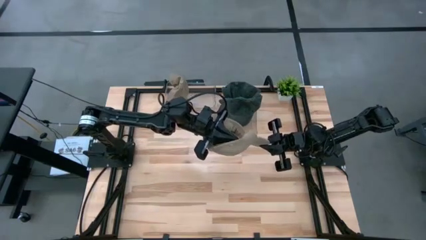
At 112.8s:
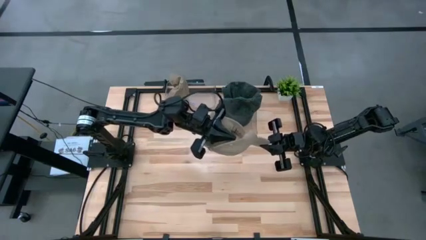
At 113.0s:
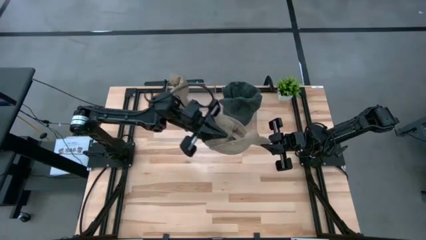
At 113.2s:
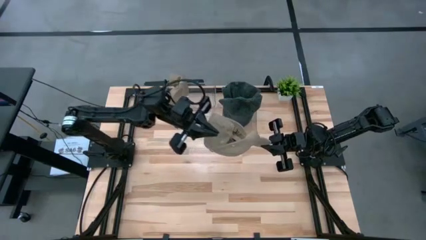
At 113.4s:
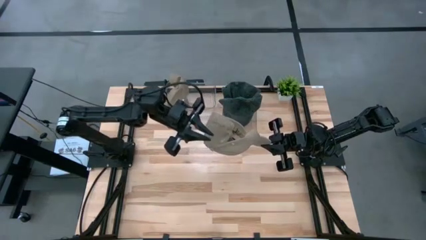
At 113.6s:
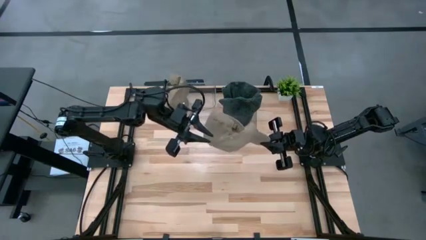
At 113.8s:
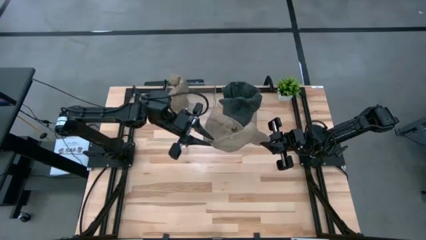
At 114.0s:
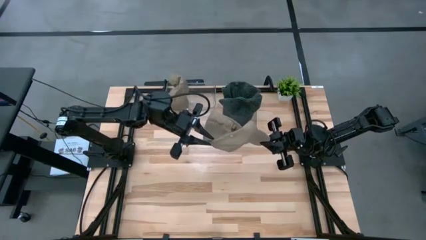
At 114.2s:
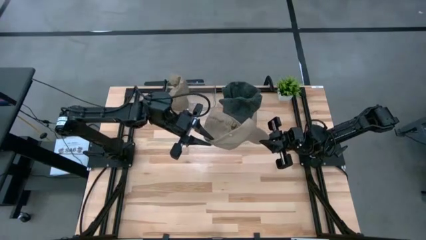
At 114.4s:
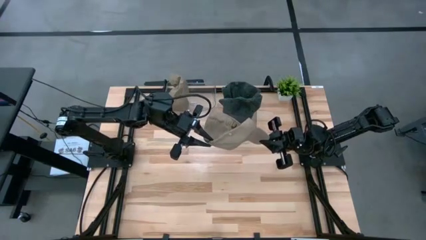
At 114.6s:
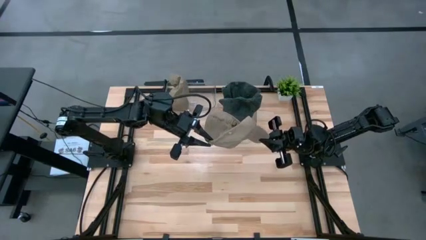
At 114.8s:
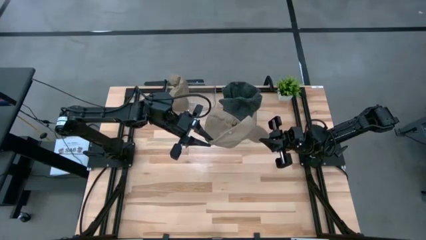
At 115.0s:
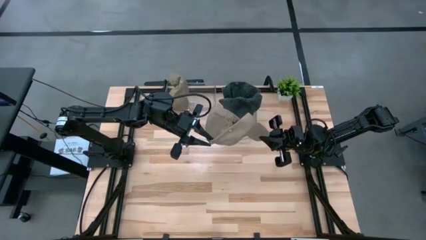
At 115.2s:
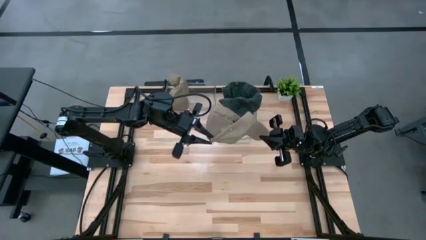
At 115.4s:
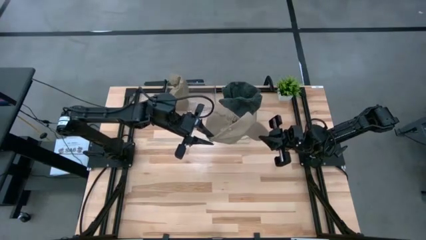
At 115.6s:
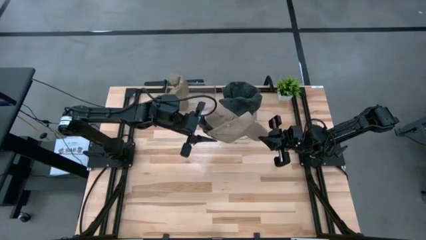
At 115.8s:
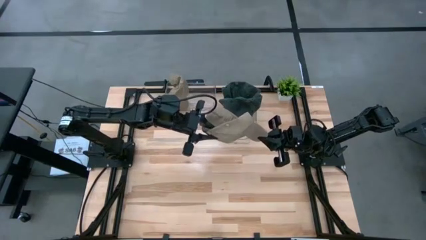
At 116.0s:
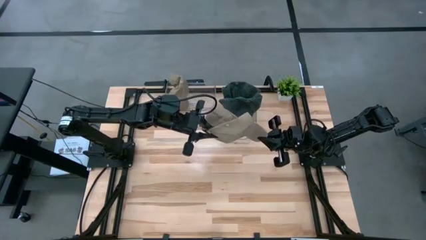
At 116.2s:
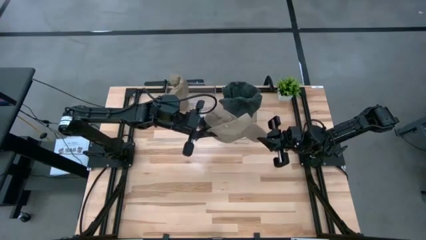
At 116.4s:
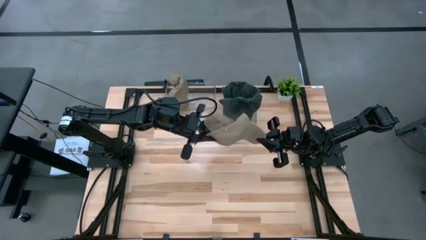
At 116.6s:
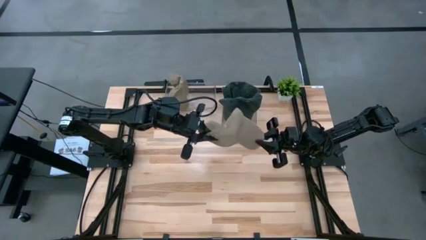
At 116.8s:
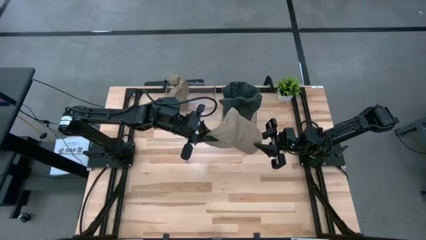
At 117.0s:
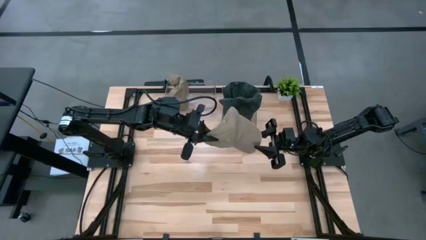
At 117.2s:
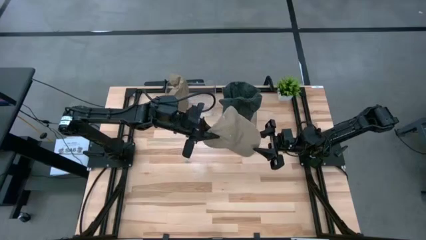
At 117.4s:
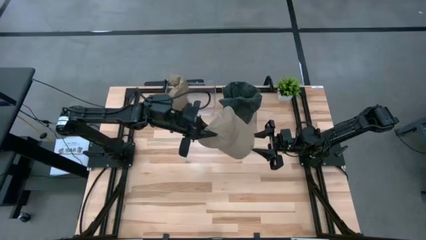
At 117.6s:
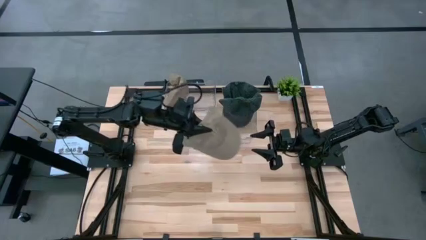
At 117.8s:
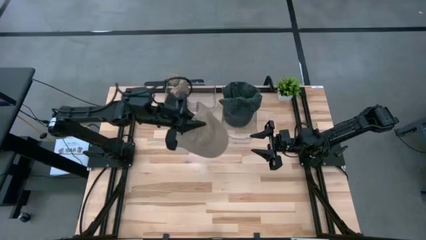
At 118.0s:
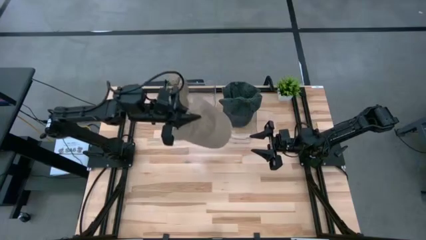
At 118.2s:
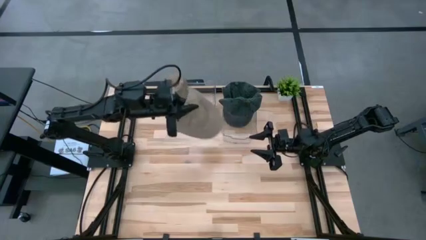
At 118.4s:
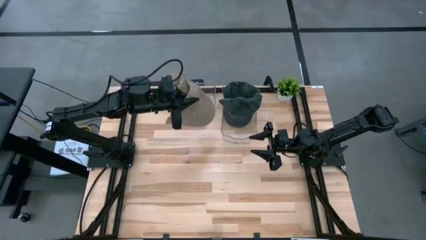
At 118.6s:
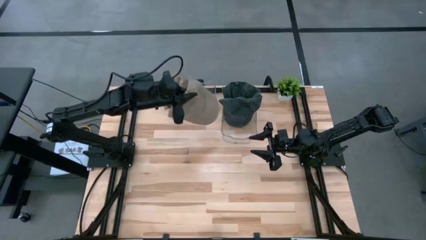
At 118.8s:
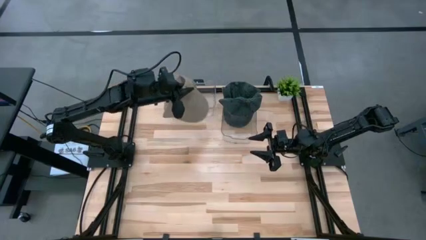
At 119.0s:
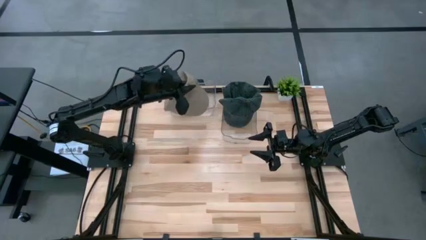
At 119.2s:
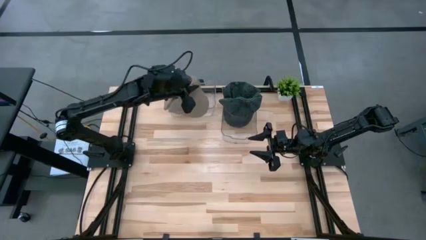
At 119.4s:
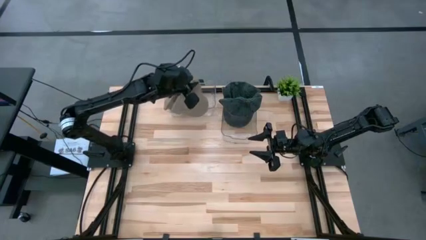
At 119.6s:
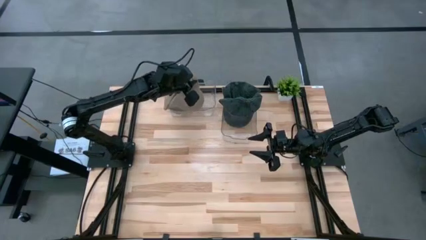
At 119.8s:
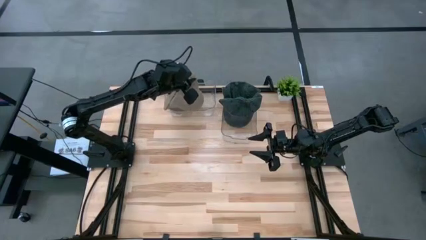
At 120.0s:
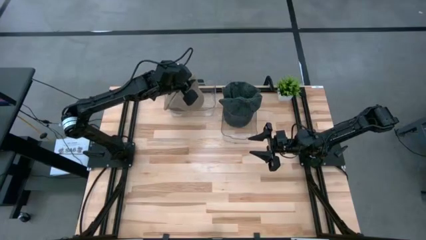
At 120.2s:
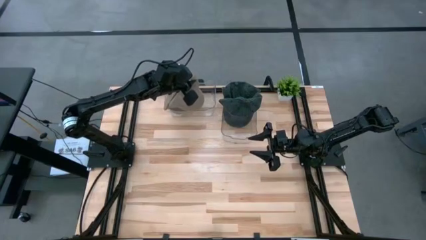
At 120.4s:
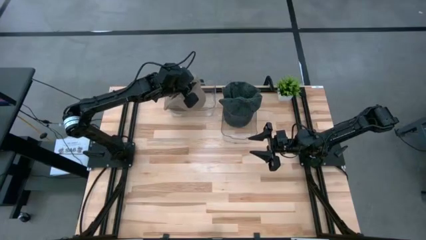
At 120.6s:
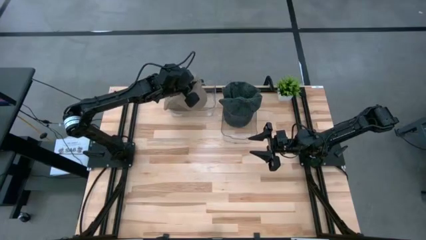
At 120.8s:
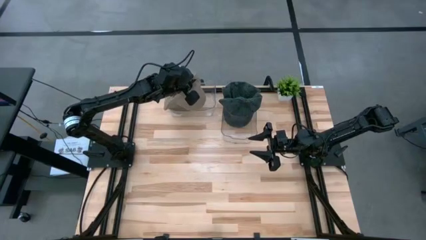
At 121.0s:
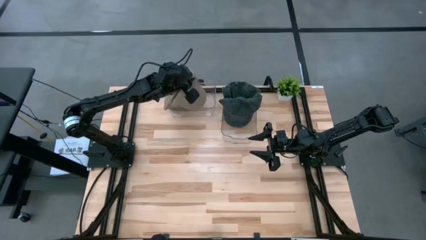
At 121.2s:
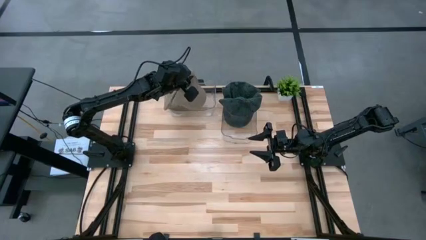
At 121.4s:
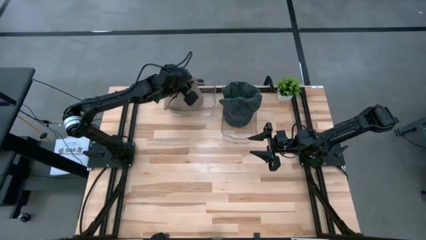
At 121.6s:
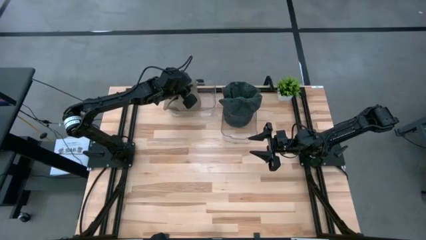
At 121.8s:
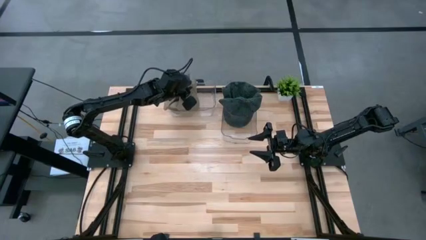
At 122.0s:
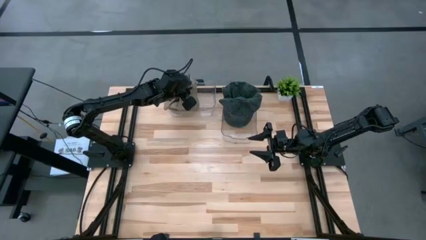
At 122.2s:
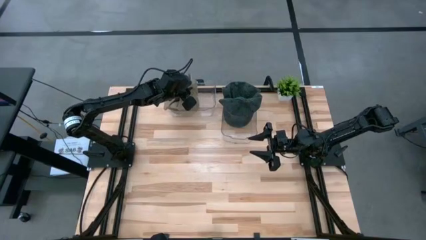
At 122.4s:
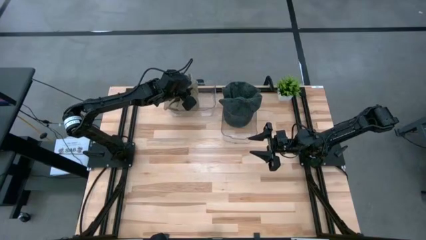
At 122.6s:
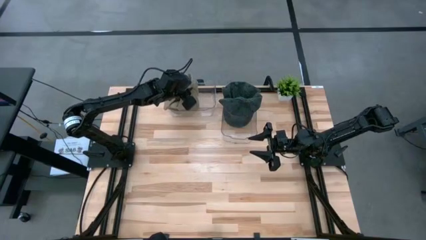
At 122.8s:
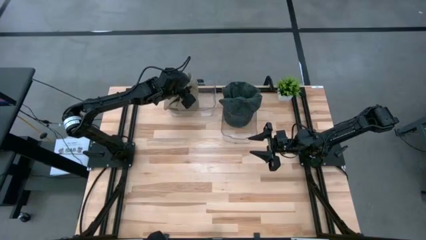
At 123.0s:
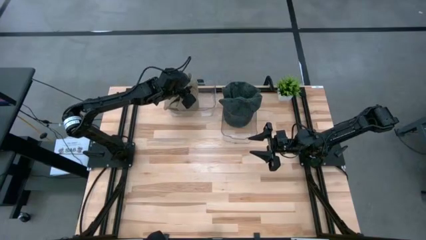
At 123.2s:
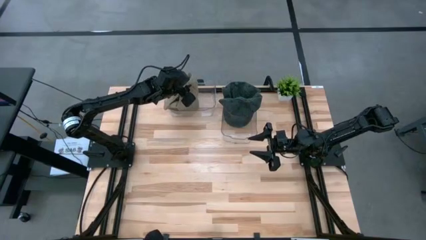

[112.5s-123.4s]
Task: Pick & Place hat
Put the brown cap into the left transparent bin

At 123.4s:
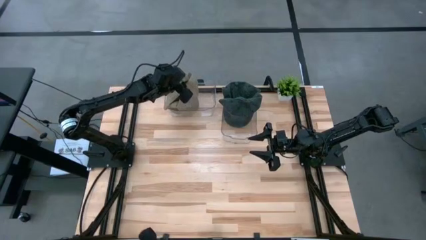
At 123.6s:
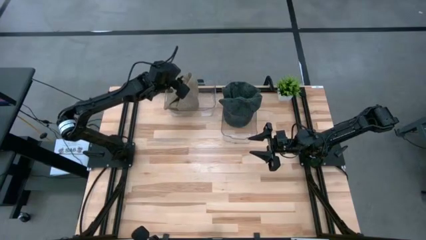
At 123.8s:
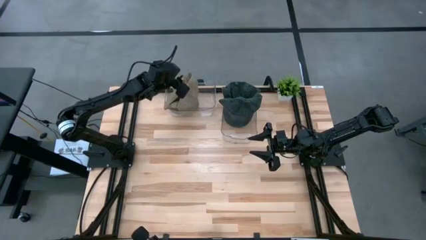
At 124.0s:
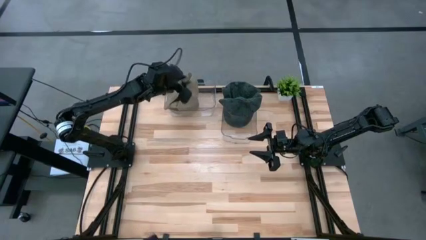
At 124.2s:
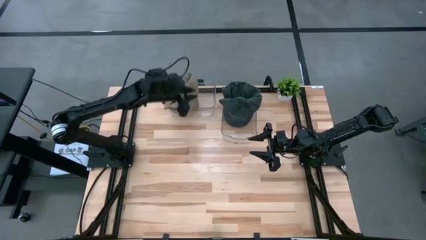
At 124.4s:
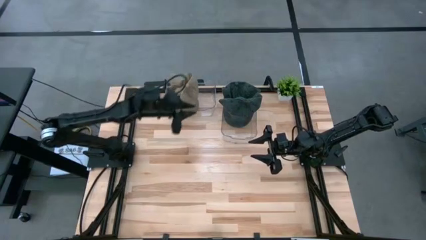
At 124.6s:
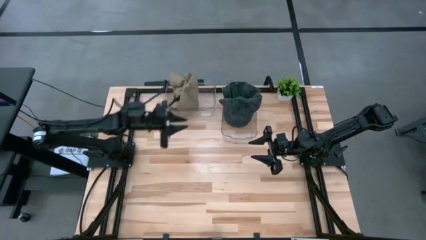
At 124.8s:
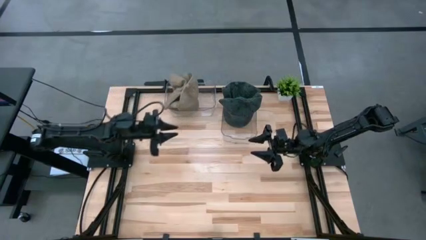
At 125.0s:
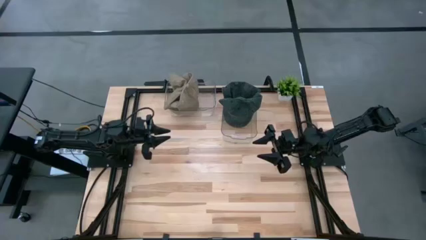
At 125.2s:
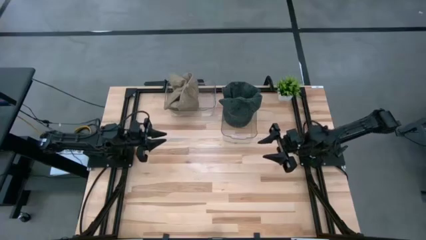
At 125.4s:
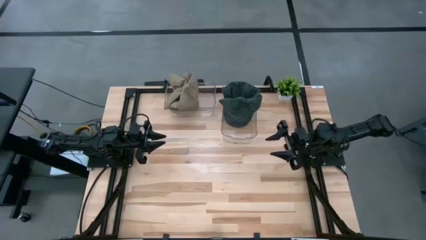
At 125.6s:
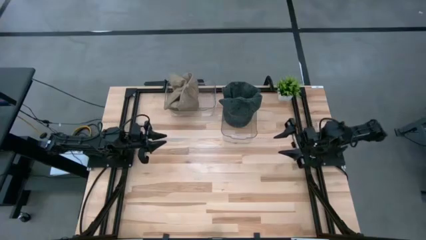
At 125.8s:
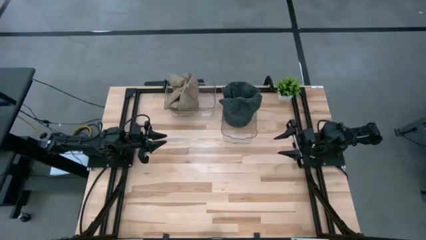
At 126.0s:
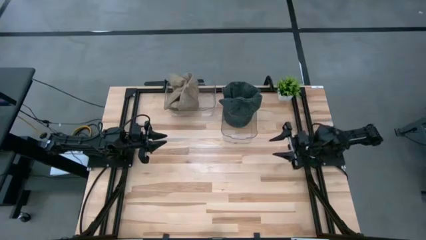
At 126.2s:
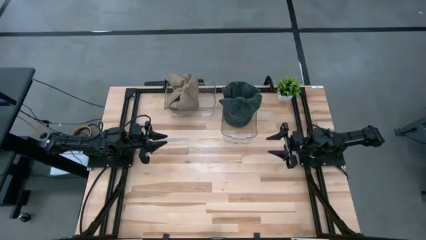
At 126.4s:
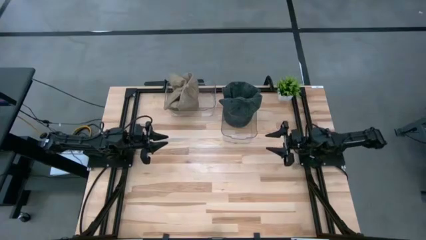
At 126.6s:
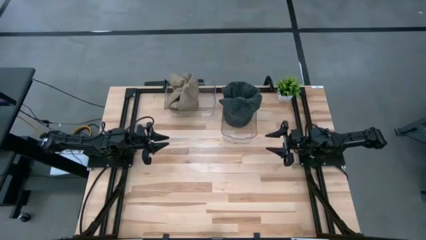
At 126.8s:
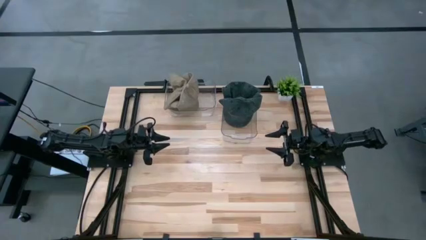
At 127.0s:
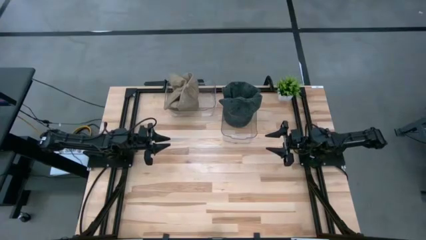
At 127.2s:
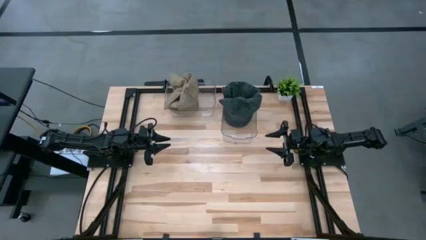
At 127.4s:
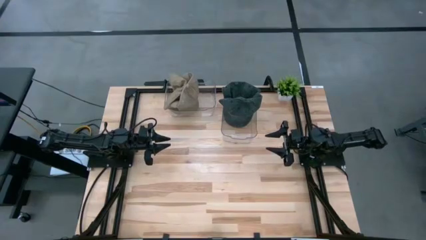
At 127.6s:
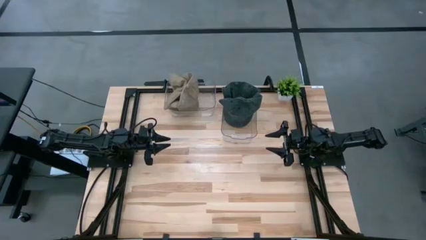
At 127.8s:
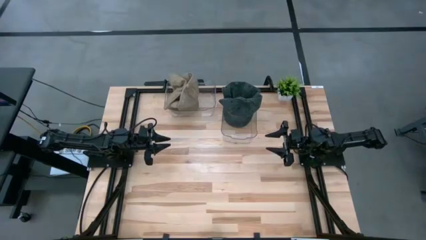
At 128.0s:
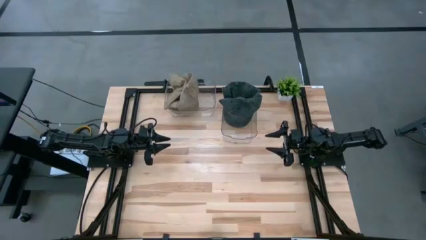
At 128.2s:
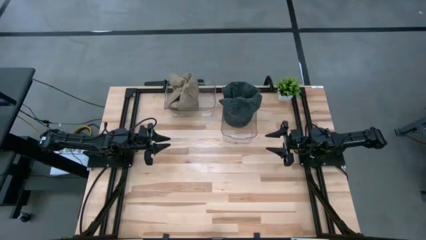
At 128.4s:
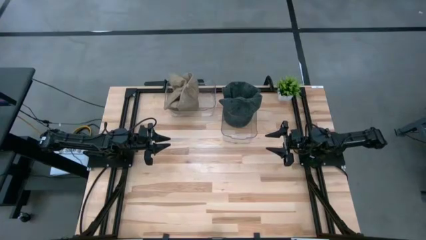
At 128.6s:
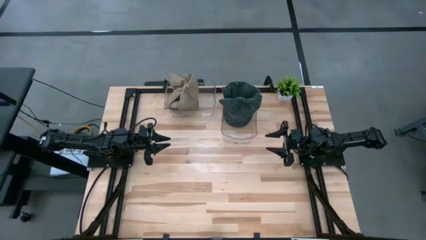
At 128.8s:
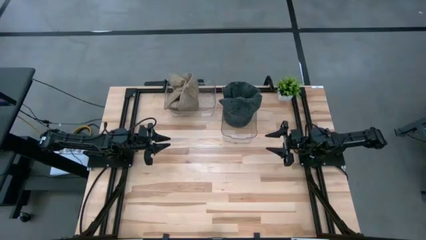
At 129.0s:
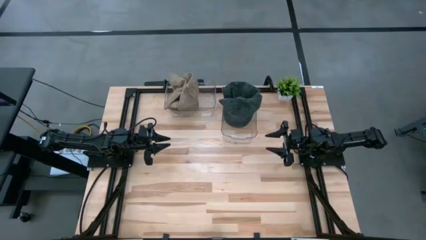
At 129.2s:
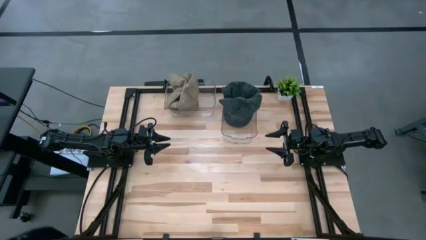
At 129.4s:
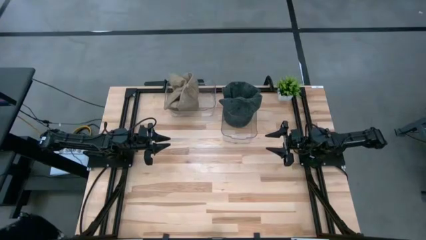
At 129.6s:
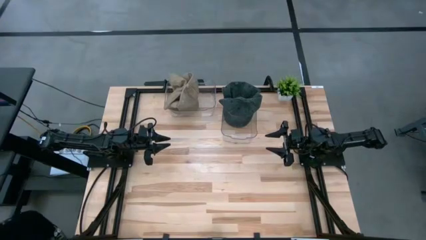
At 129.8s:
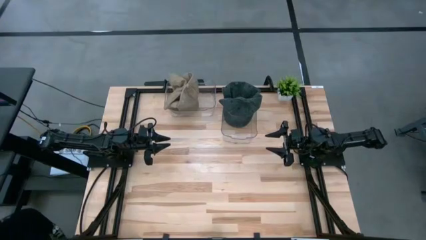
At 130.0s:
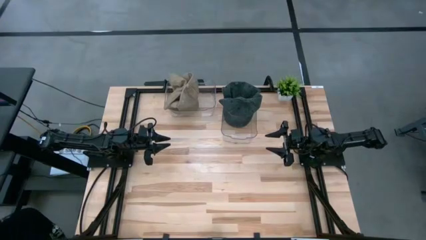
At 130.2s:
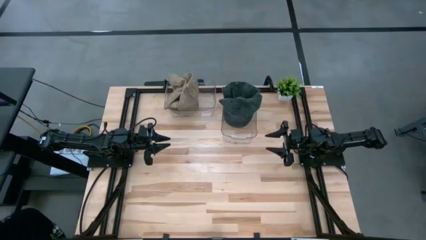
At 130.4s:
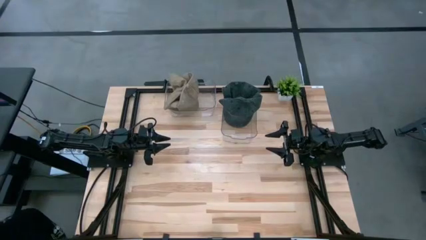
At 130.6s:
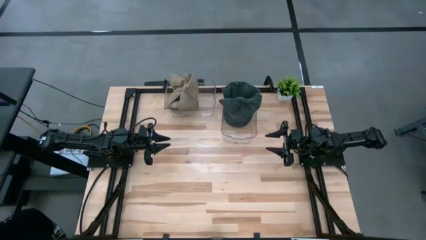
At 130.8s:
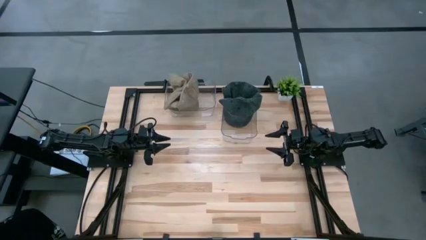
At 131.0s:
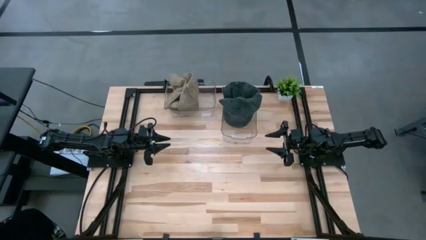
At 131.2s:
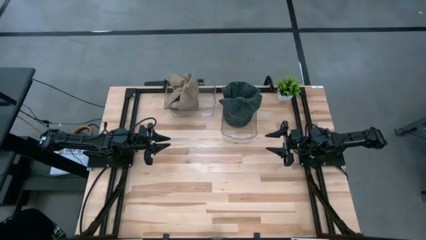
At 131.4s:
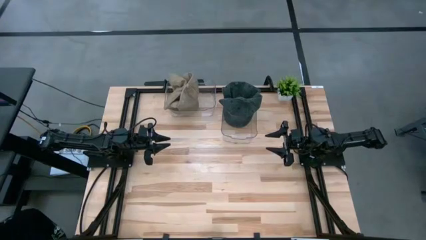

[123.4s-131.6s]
Return to home position
